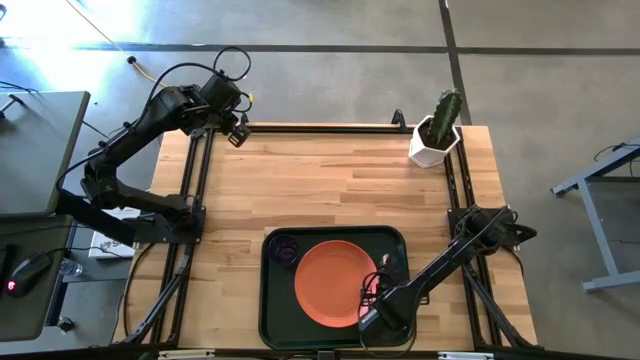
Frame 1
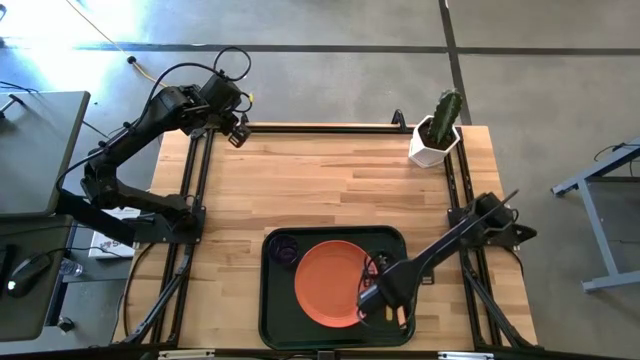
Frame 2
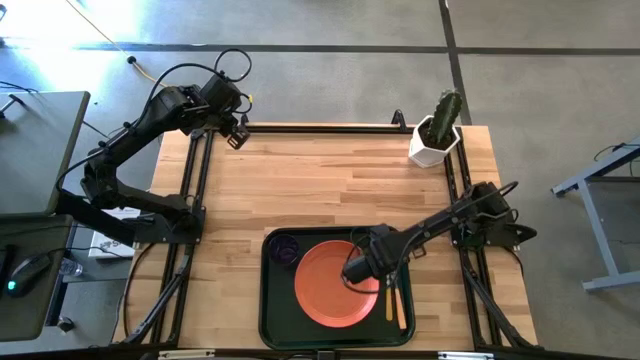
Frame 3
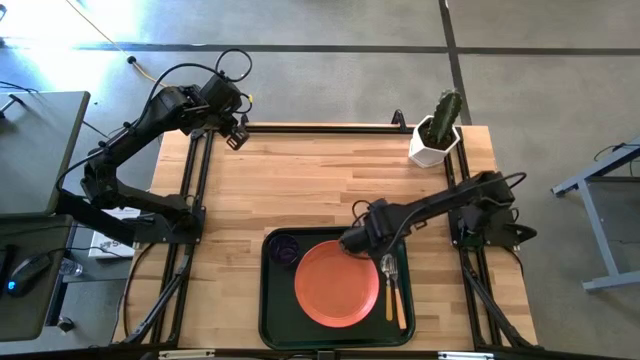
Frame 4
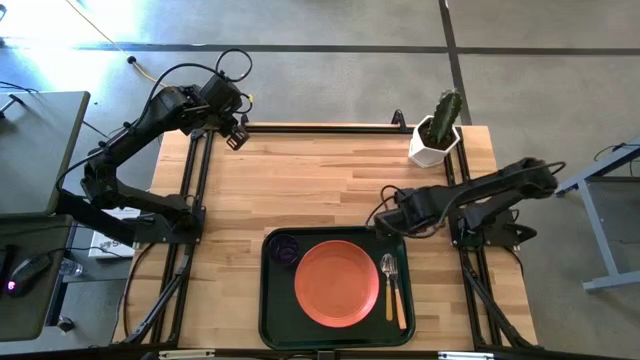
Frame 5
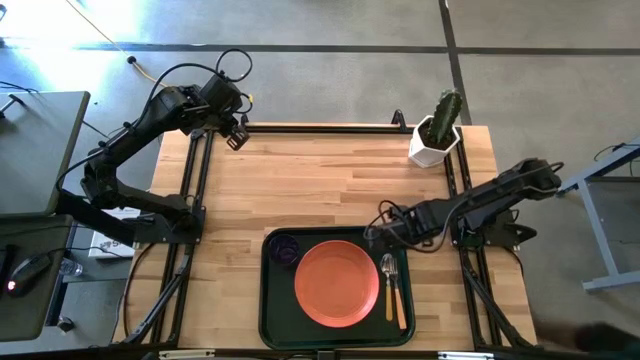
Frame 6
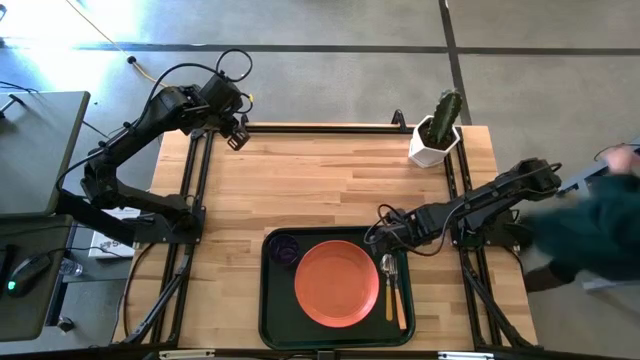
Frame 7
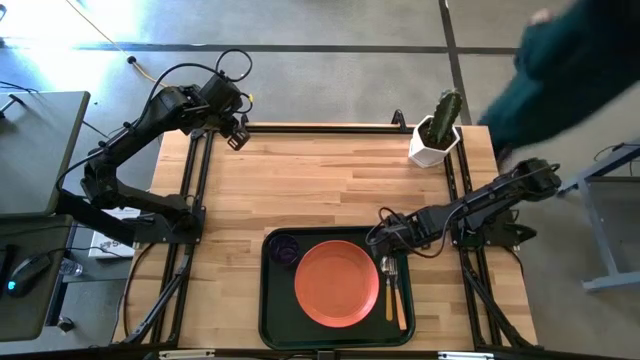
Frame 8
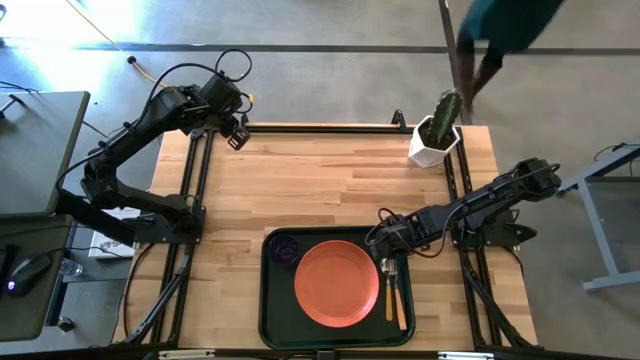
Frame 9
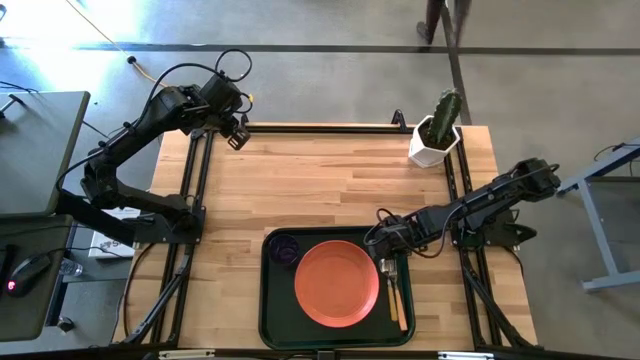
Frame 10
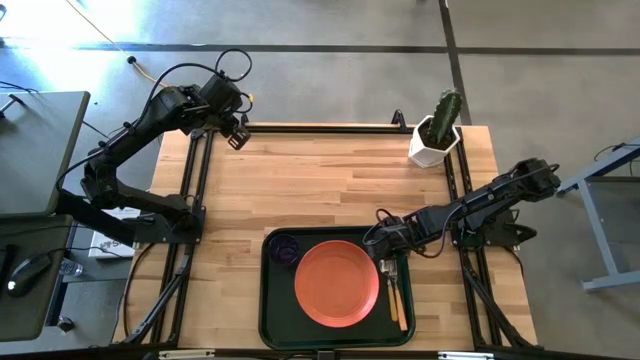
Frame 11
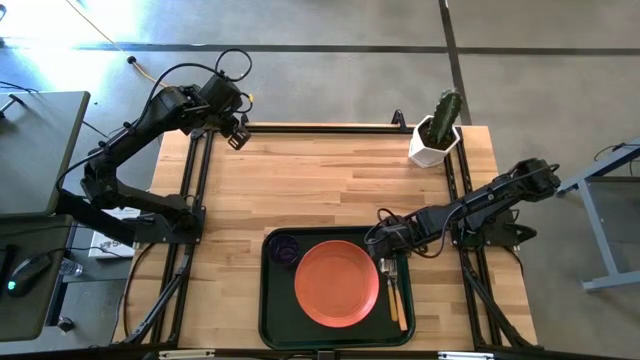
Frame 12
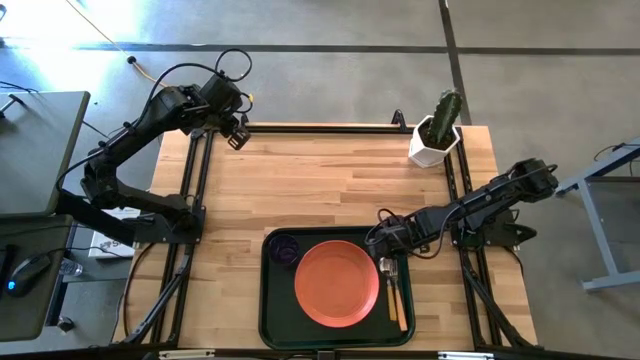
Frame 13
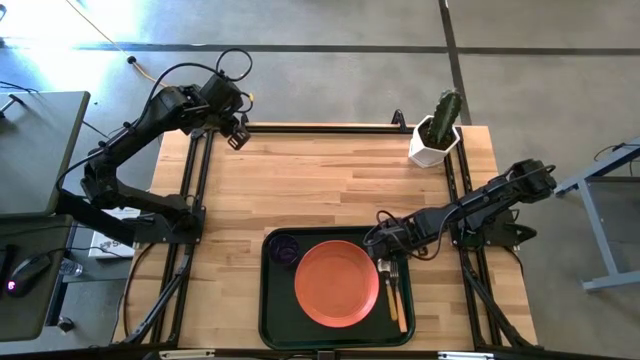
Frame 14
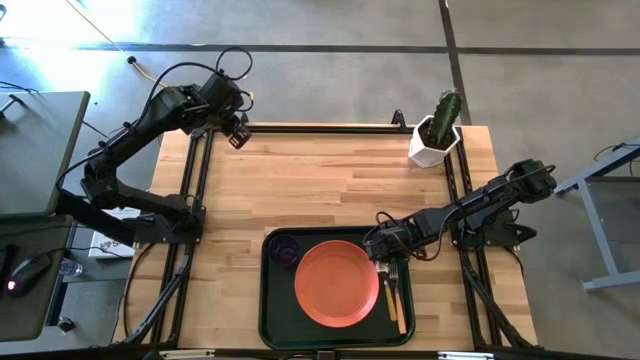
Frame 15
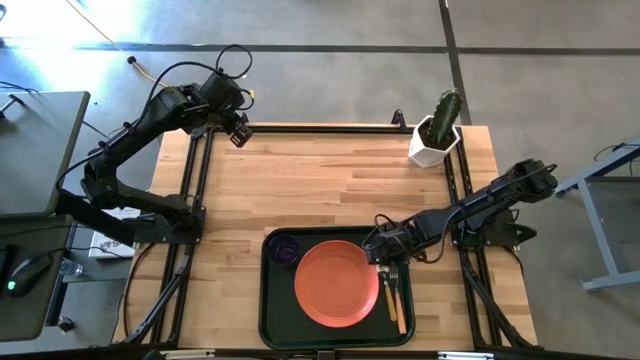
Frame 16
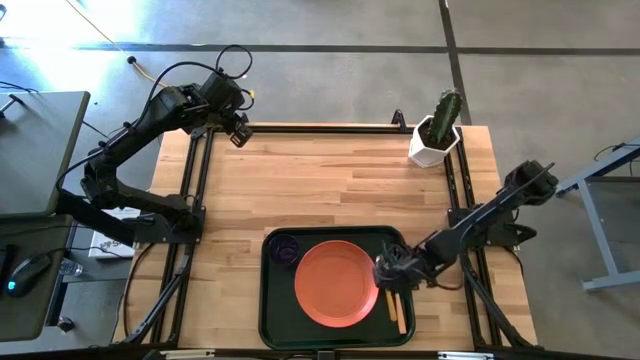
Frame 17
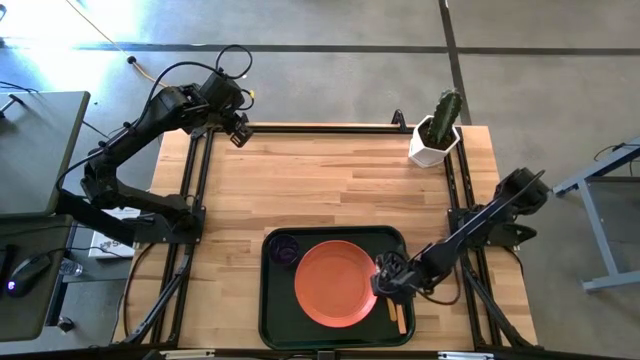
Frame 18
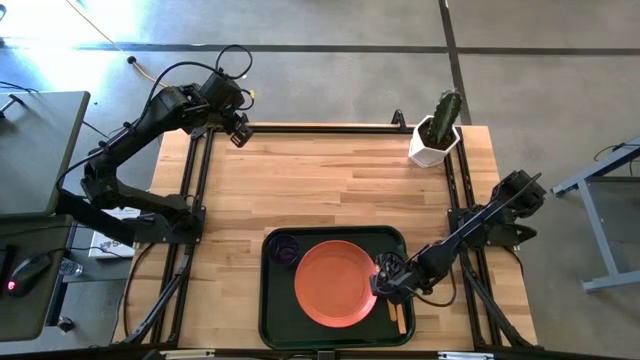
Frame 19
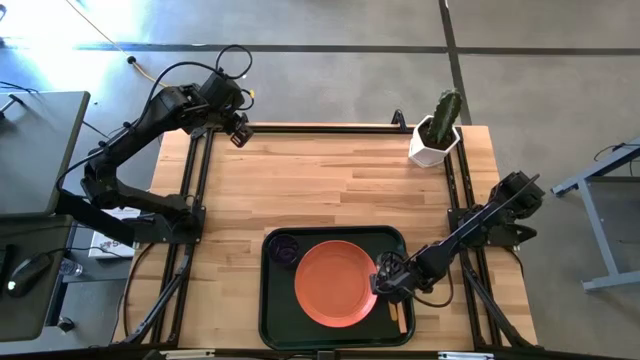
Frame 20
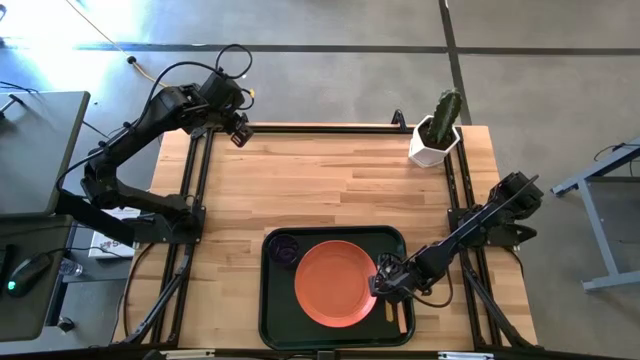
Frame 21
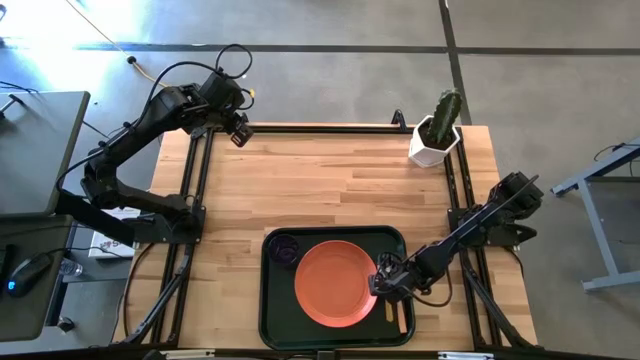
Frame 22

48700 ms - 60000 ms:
Task: Pick and place plate/cup/fork/spoon on tray
Adjust the yellow spoon on the black tray

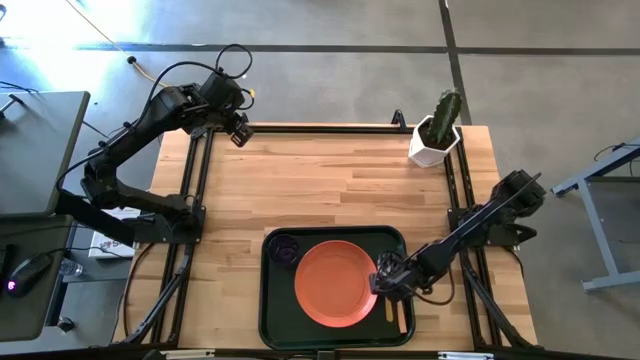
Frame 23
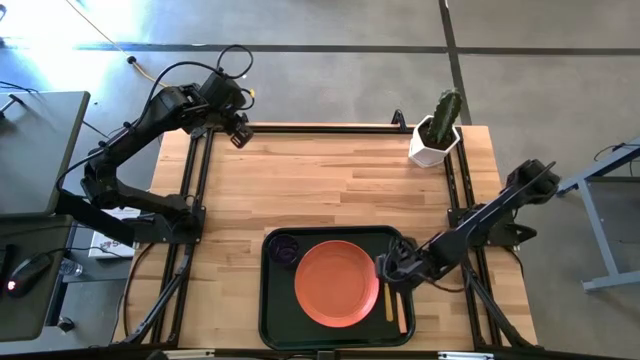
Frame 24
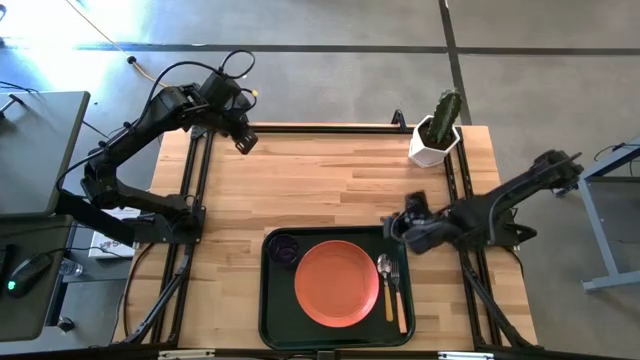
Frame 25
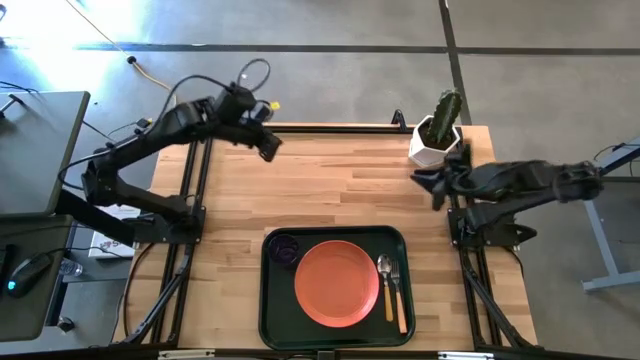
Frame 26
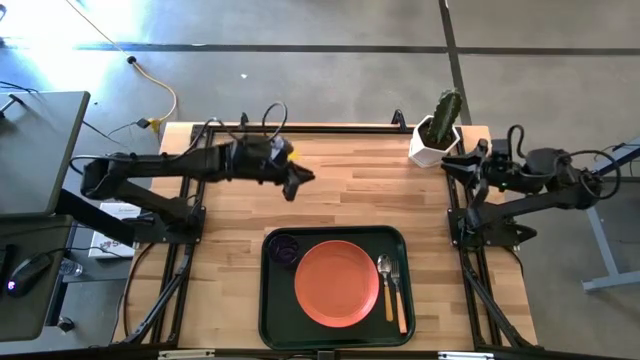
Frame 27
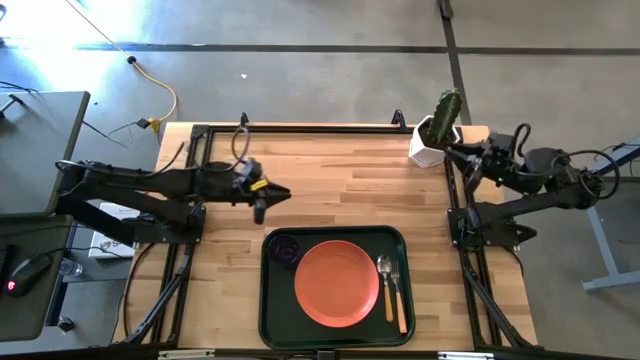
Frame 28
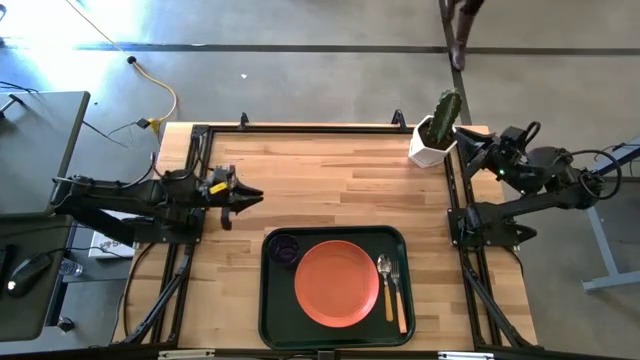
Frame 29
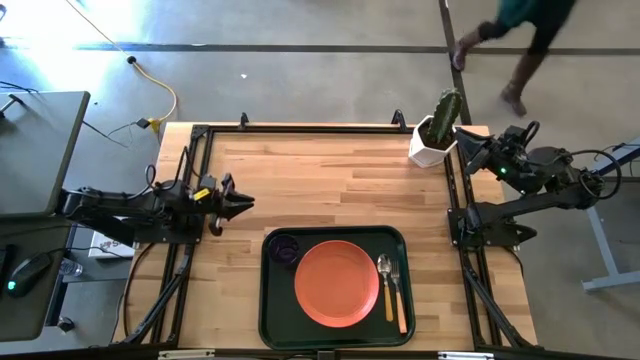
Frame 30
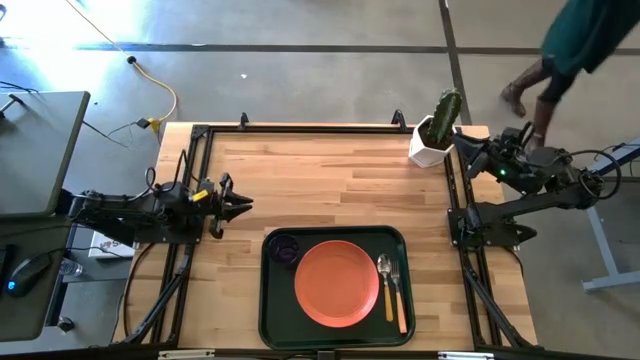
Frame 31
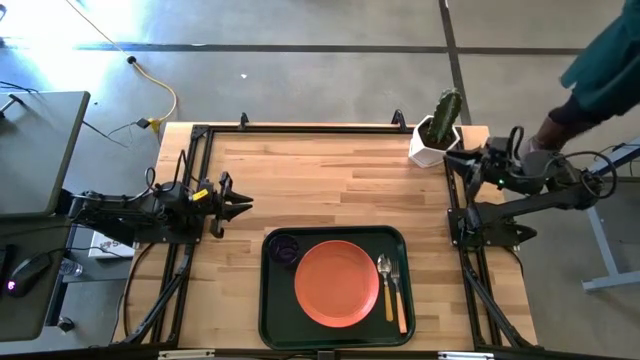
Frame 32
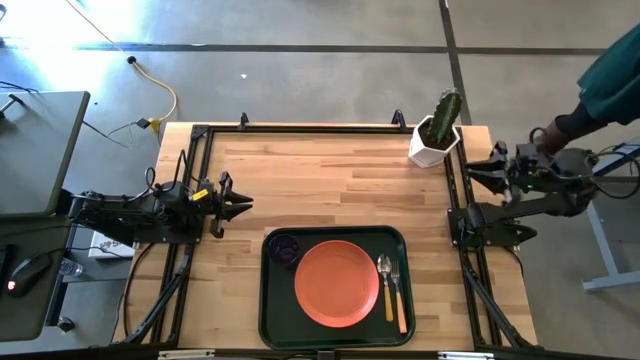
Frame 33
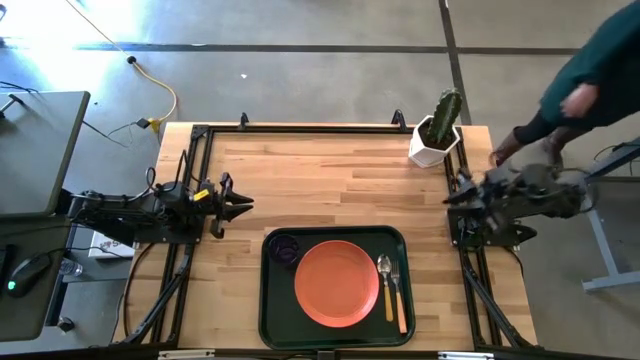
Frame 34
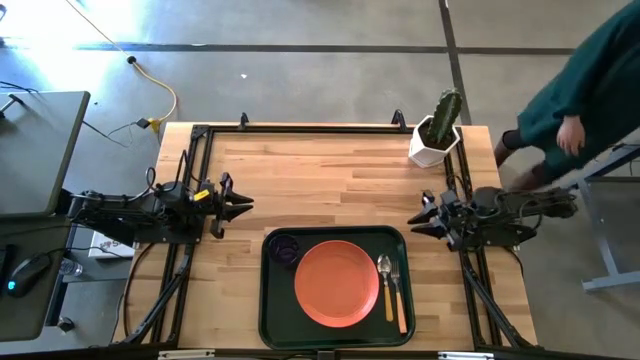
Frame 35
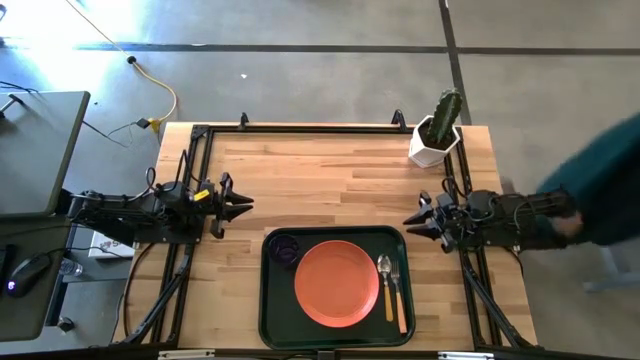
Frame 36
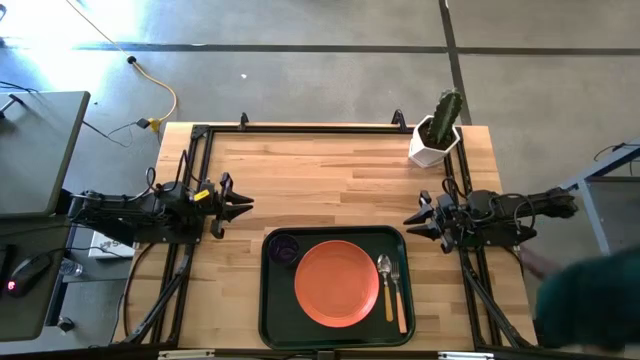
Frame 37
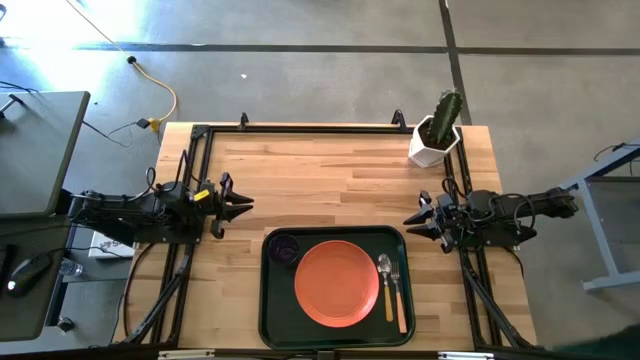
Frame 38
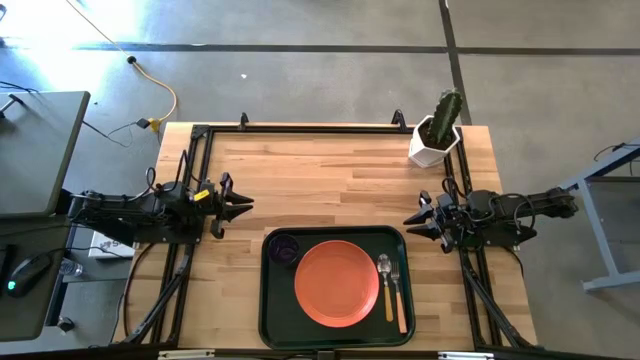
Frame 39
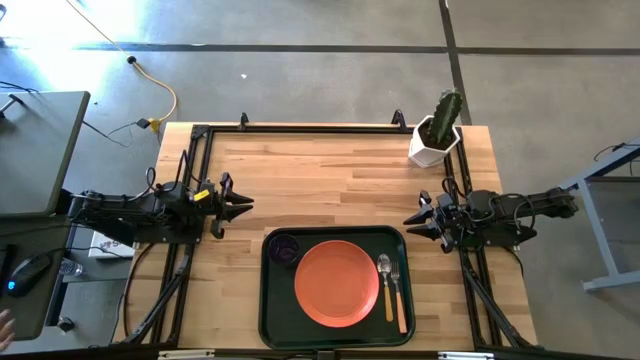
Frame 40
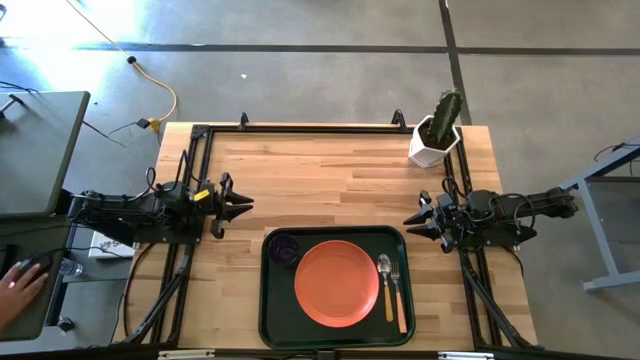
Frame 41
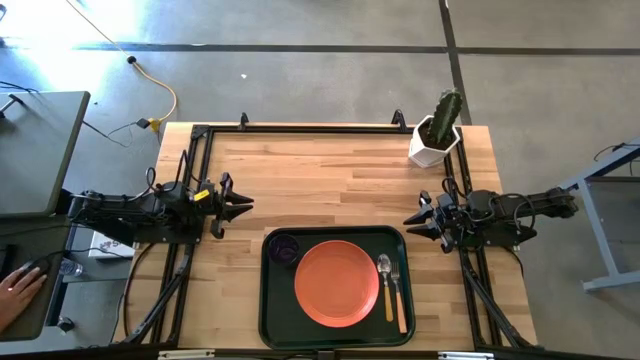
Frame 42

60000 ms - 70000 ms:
Return to Home Position

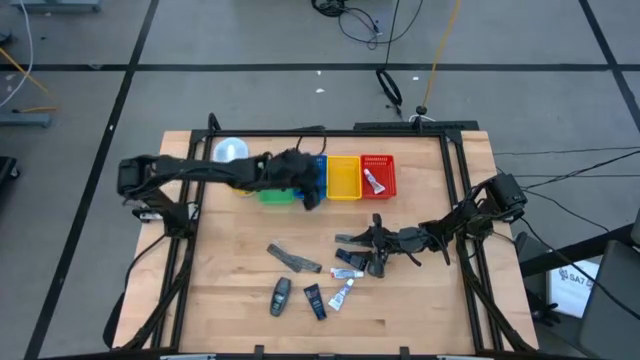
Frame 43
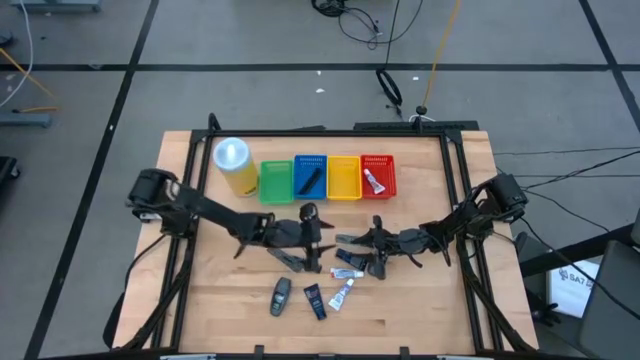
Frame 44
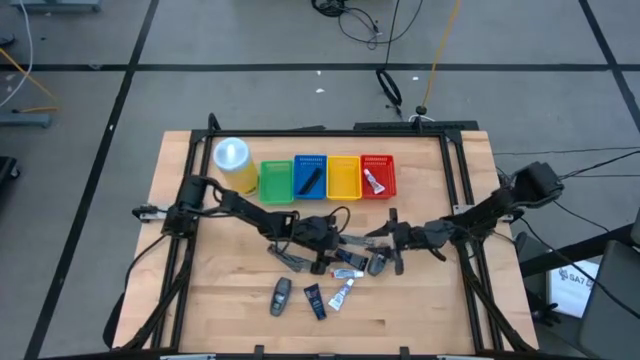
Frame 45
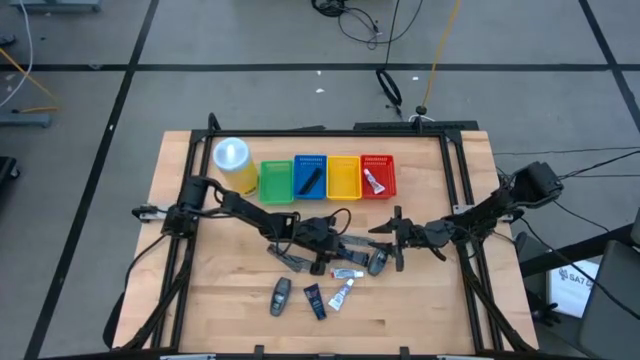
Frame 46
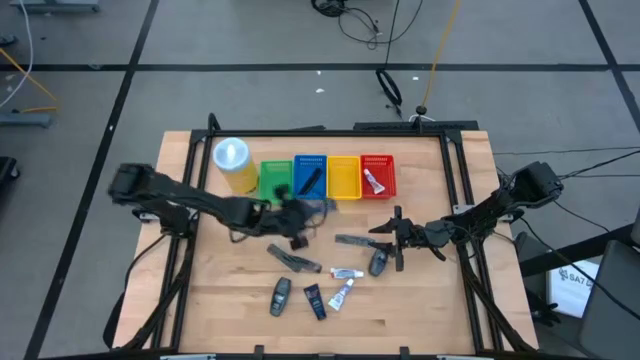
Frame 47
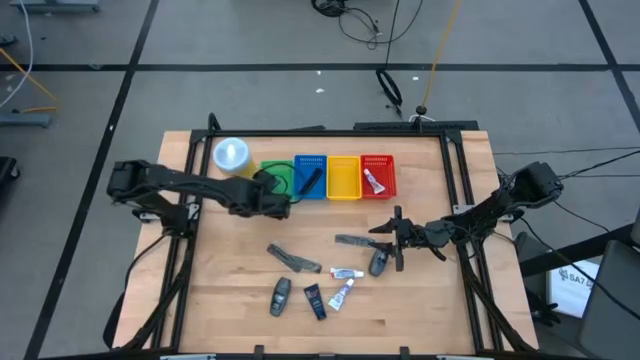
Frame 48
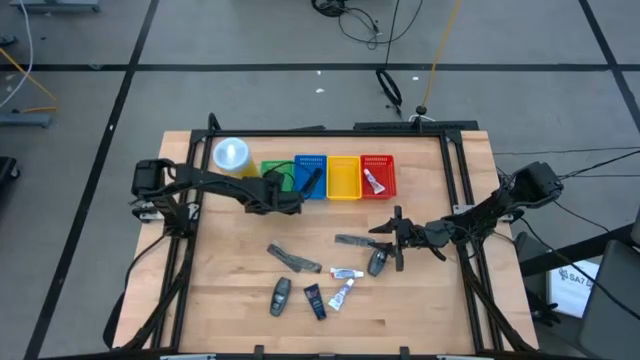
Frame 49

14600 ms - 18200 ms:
Task: Pick & Place Travel size toiletries
Put the shave cream into the green basket
